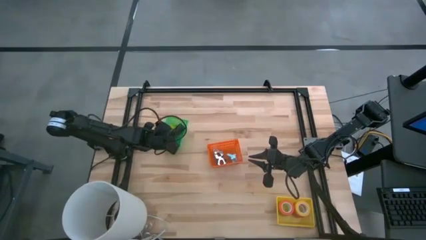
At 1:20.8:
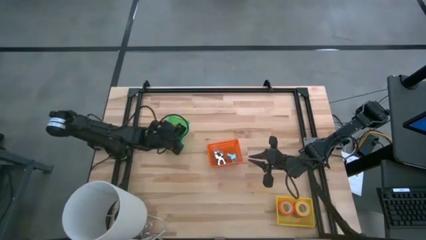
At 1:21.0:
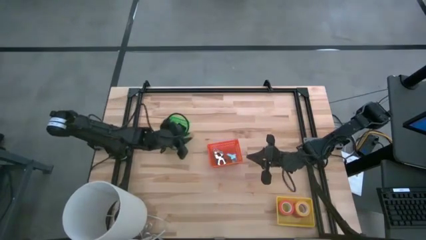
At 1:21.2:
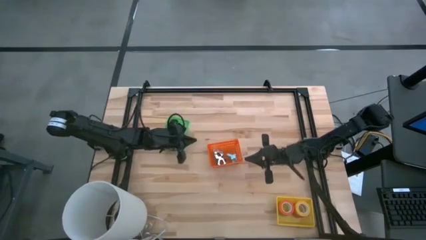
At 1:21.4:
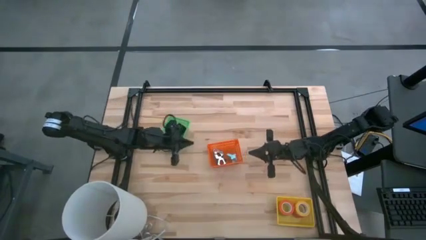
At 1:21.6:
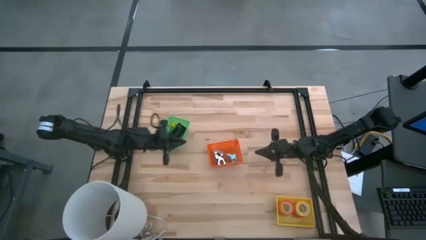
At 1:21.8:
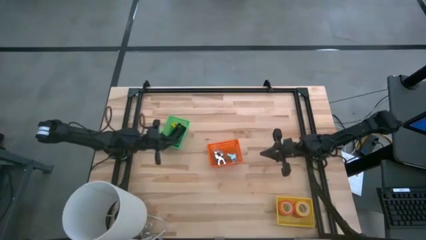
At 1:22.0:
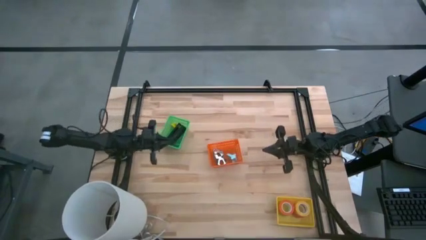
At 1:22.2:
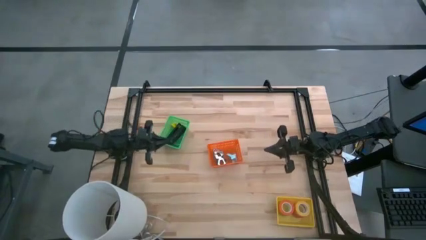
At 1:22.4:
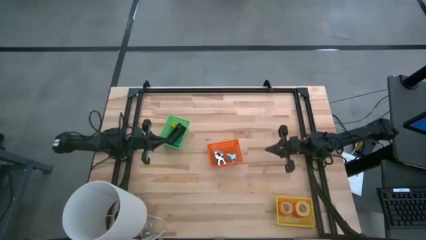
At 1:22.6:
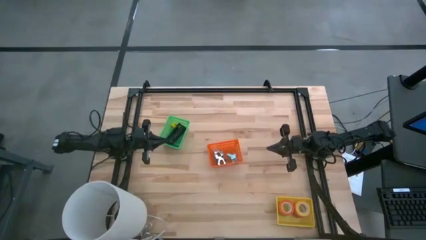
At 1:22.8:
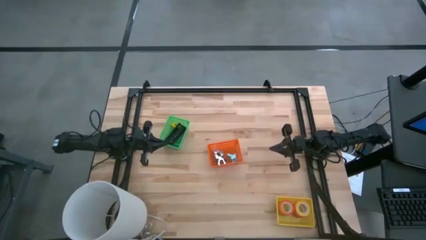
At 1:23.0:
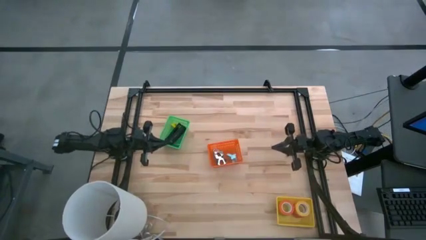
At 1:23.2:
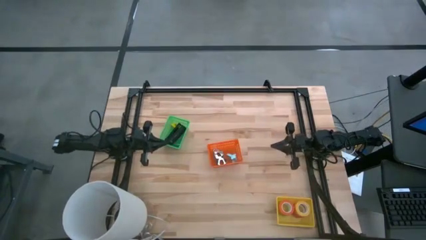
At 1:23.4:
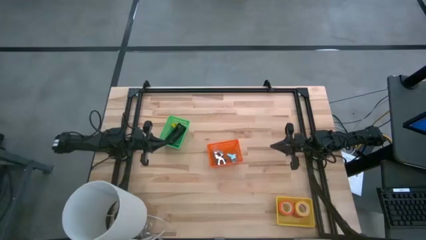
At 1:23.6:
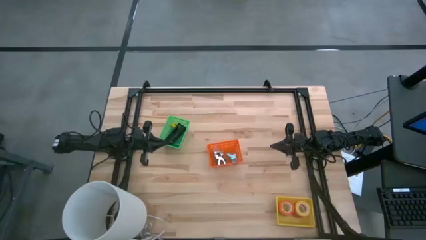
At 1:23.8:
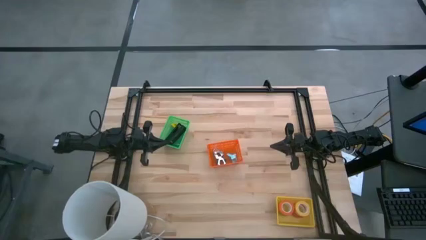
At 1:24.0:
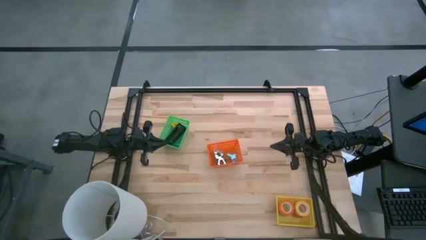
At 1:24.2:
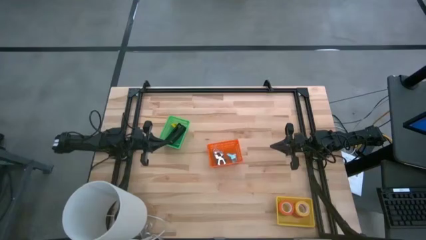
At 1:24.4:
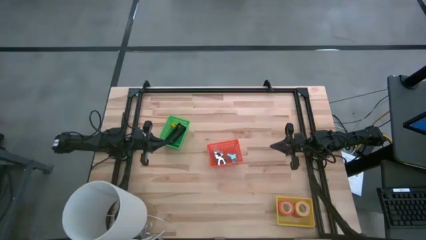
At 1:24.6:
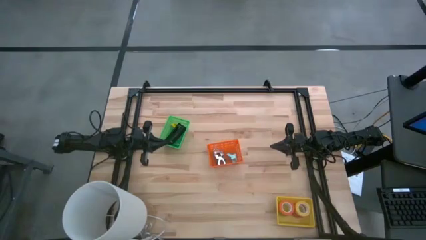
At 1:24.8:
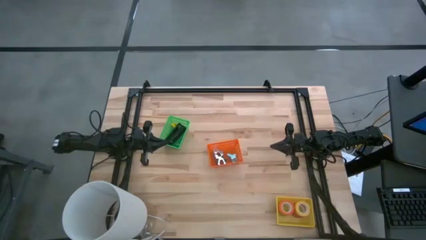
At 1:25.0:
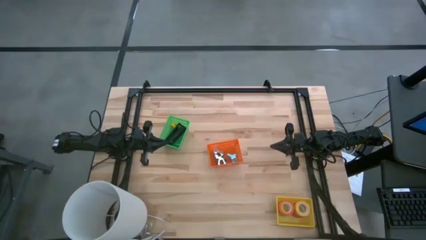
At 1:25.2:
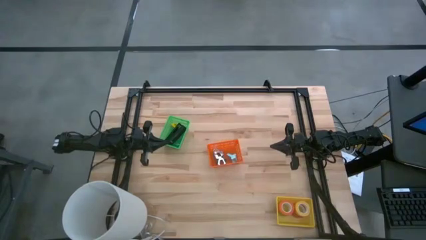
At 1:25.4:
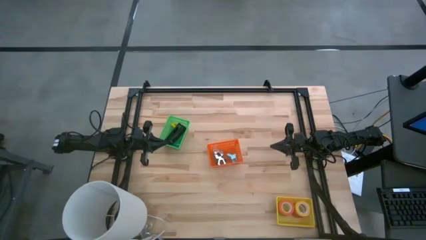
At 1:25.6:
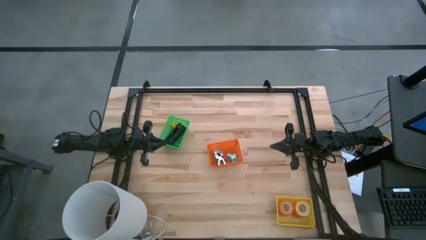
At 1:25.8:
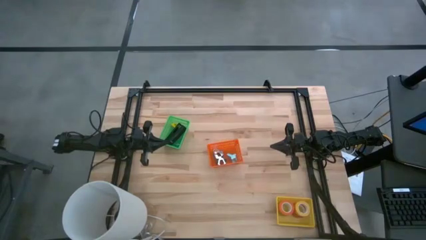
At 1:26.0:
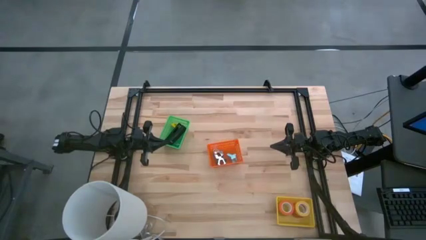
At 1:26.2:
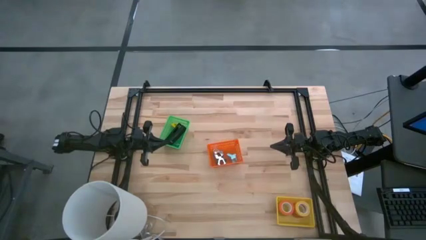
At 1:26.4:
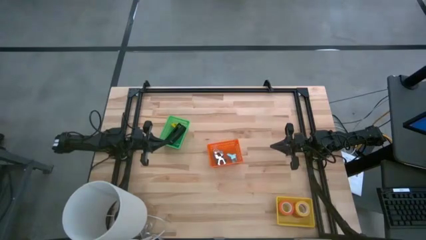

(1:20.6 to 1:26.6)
Task: Pick and place Stapler, Stapler remover, tape
Return to Home Position

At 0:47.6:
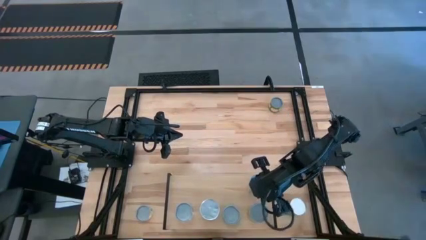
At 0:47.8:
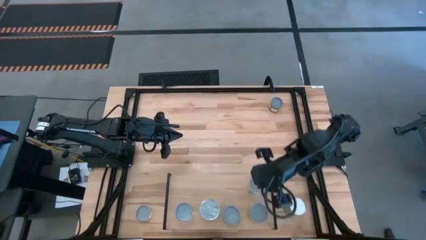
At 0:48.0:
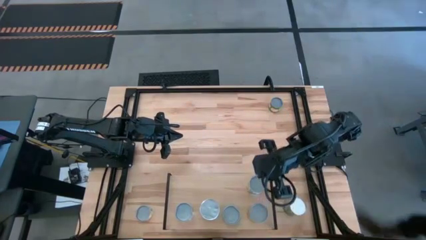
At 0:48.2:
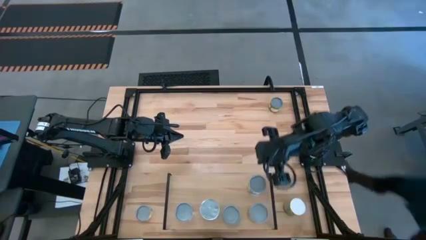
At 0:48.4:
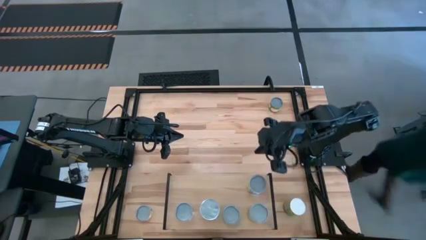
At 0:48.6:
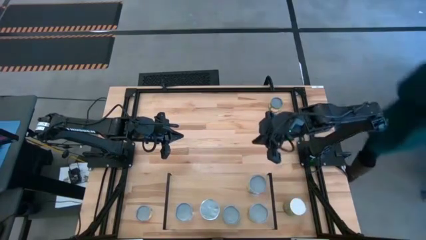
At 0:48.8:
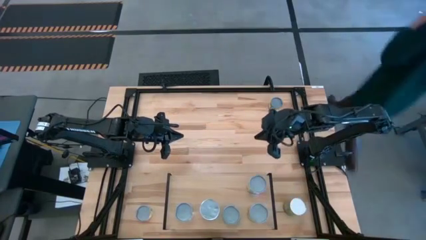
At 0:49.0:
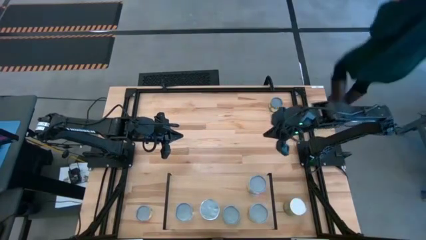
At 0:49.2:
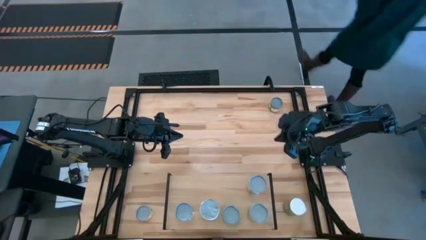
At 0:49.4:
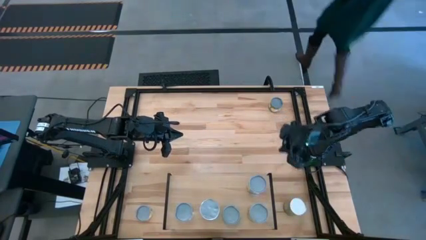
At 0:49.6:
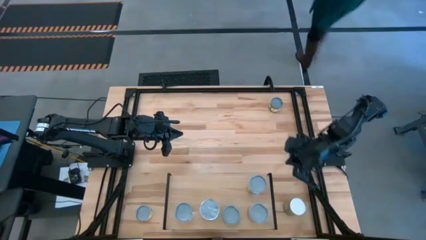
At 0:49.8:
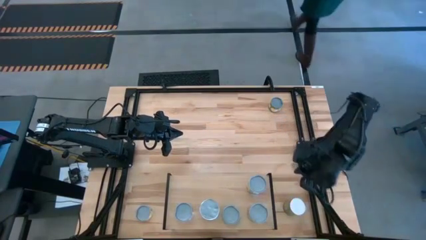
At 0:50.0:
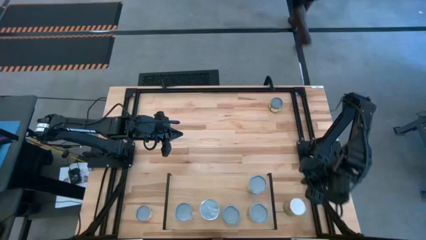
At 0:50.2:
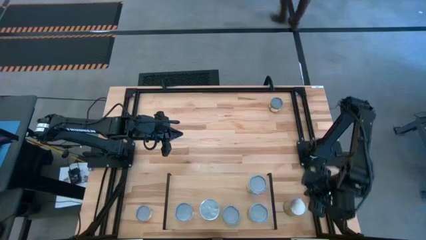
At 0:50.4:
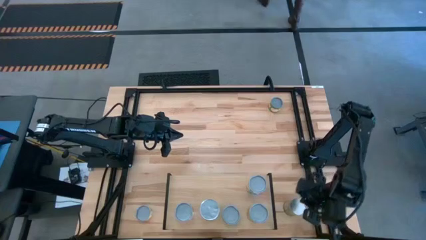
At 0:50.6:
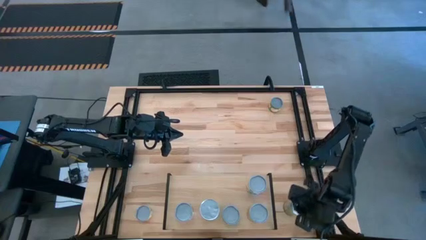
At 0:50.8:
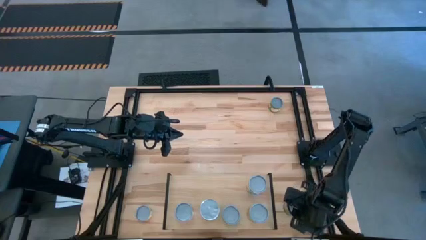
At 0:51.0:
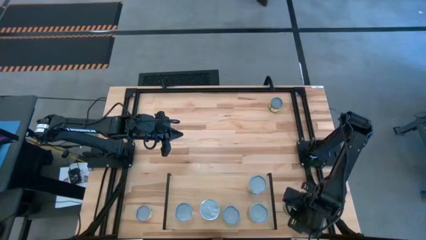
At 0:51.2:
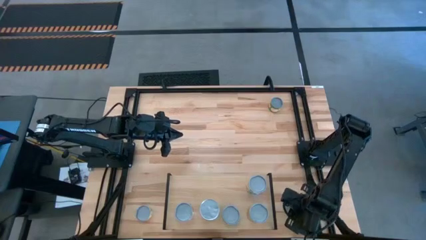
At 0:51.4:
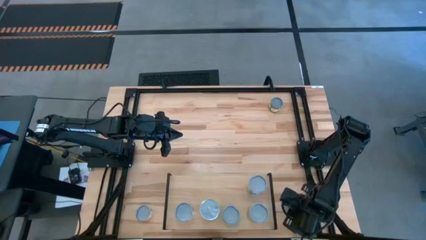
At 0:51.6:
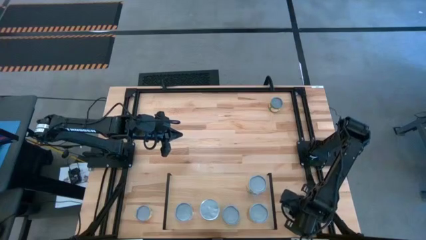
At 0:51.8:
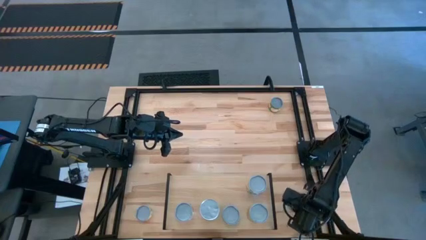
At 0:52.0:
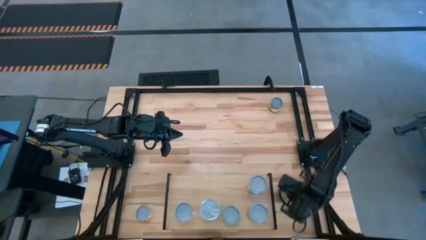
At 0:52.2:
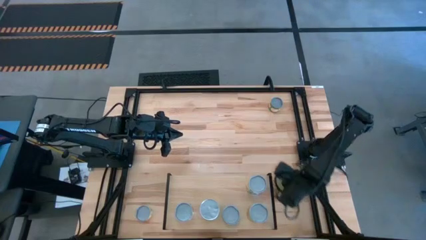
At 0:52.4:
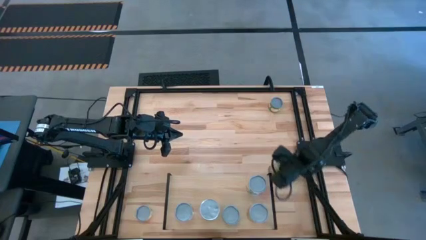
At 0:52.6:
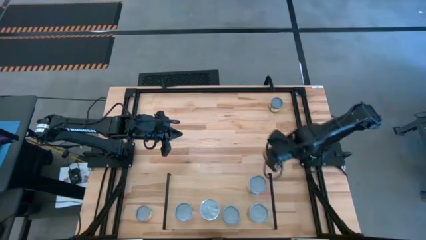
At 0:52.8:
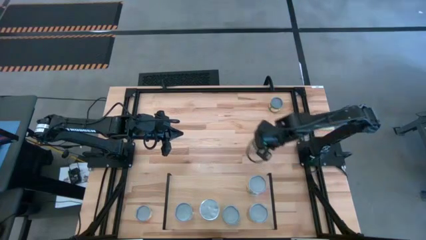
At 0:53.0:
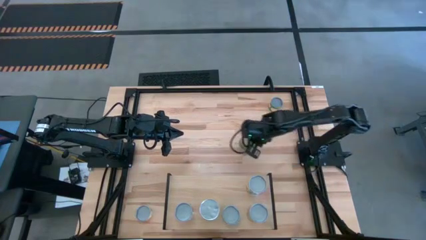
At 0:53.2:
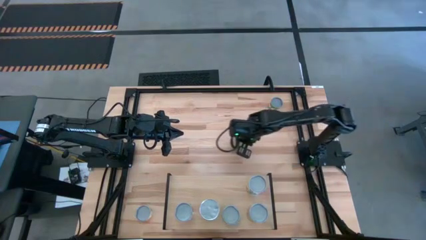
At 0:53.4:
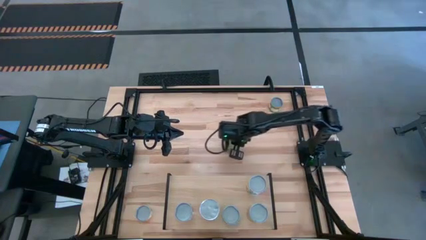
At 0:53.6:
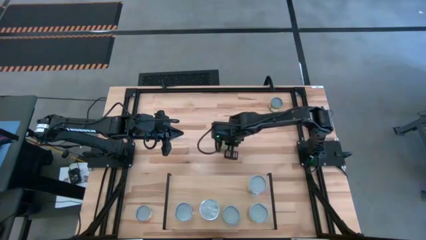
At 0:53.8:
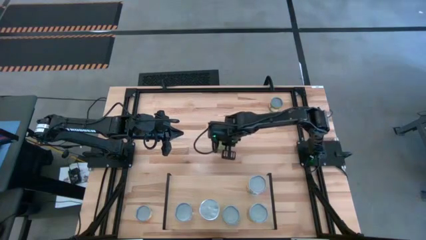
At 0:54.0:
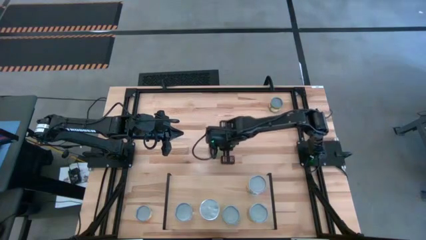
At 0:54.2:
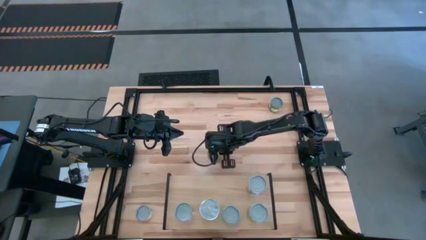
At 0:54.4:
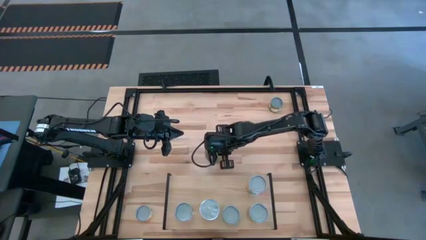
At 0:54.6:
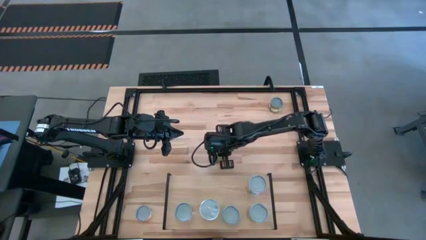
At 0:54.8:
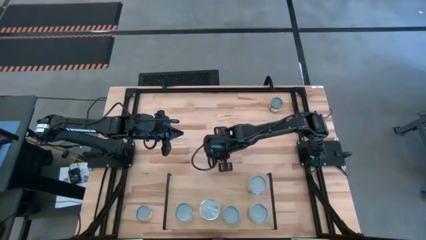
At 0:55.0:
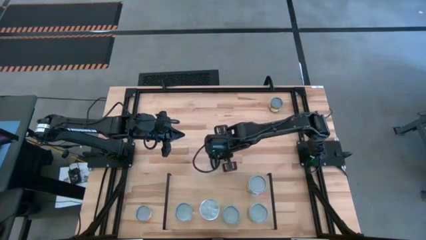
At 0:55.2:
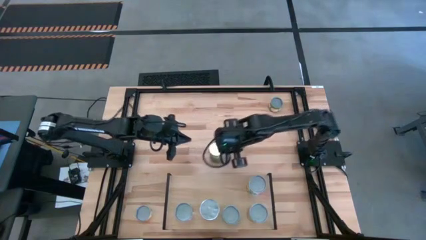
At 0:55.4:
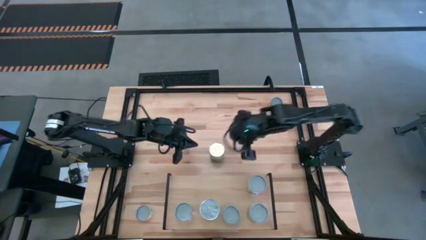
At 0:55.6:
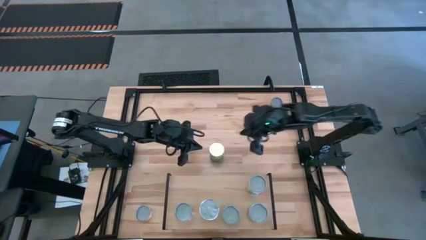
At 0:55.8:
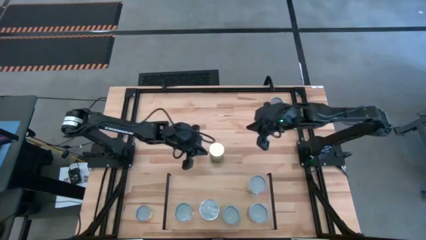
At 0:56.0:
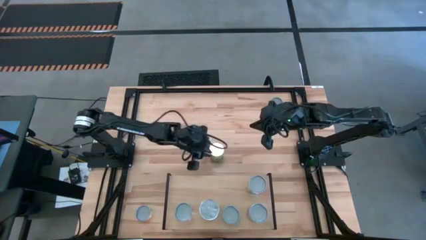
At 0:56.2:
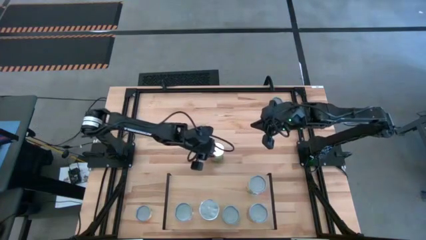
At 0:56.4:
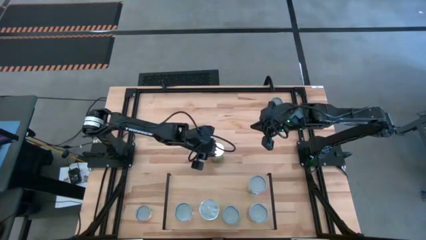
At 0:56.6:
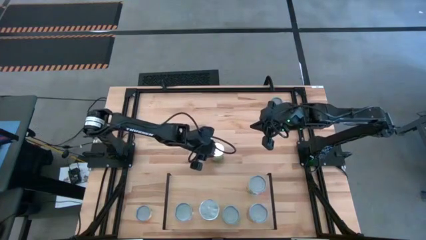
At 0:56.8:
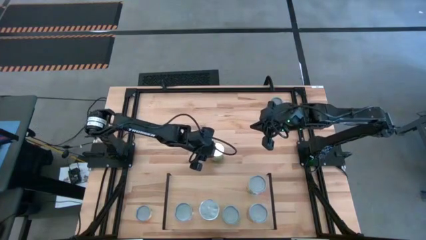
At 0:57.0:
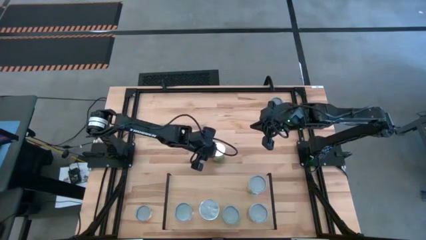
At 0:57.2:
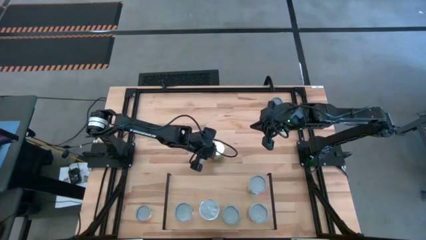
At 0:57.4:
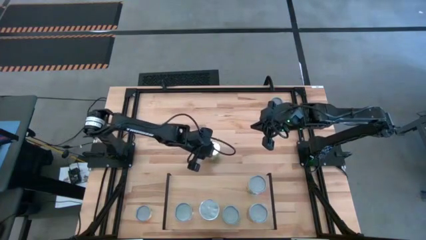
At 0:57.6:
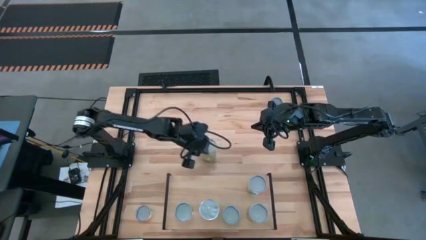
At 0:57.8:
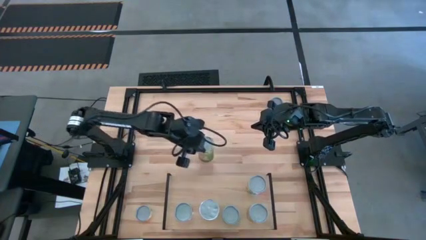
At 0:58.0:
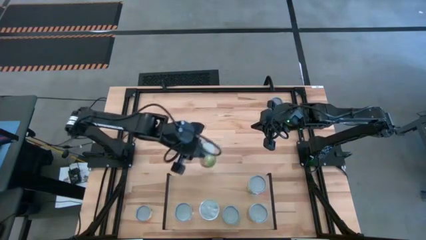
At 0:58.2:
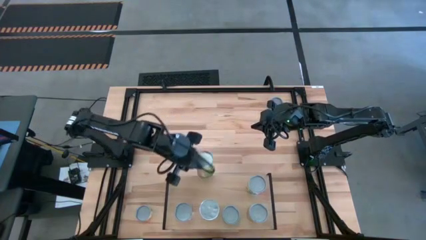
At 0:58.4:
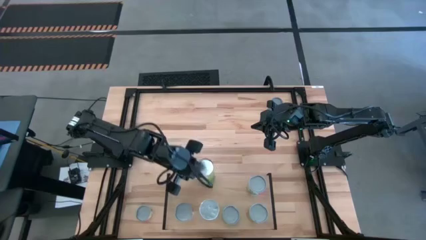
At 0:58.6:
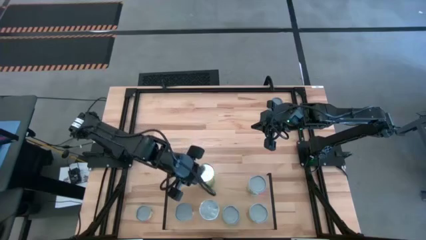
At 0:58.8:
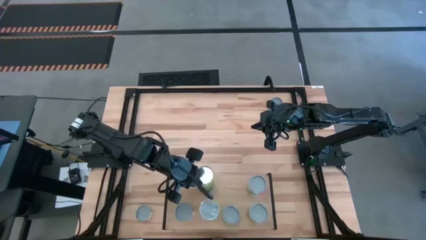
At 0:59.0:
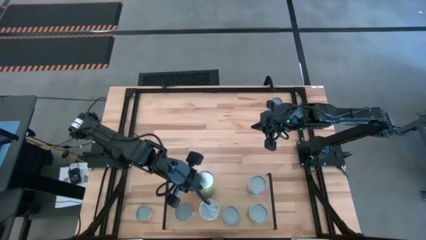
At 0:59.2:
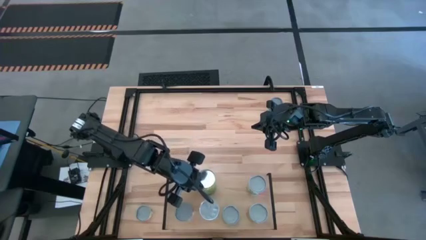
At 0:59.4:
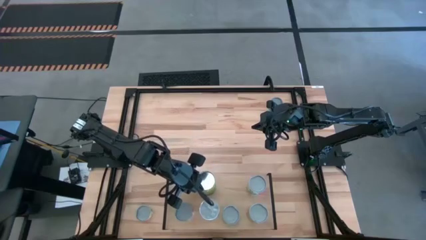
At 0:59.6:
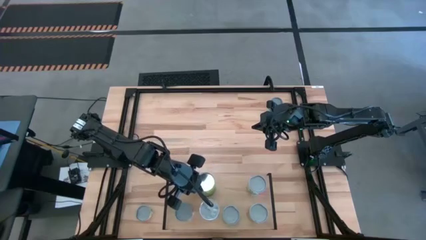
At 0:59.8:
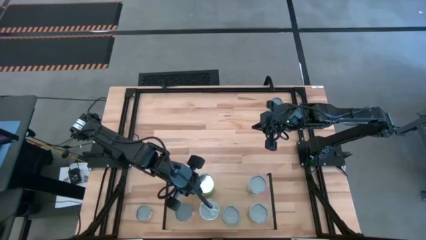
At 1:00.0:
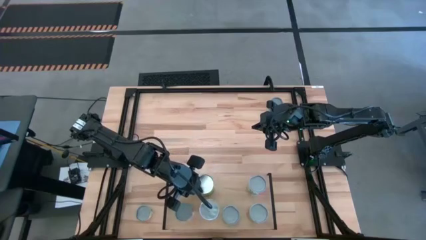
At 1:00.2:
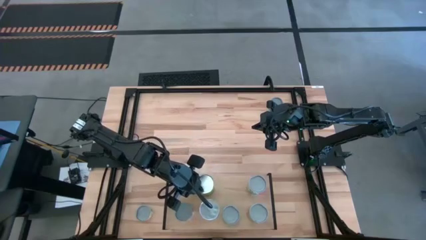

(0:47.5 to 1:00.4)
Task: Pick and place cans onto a shelf
Put the canned oranges on the shelf
